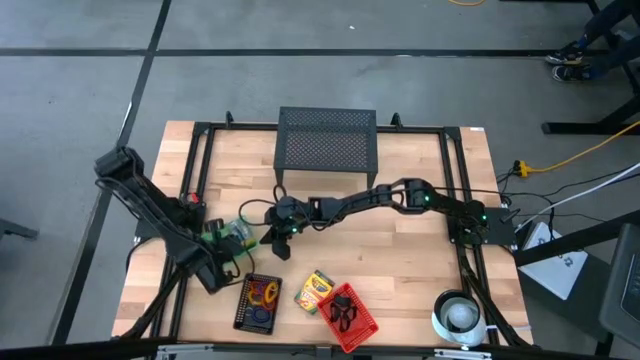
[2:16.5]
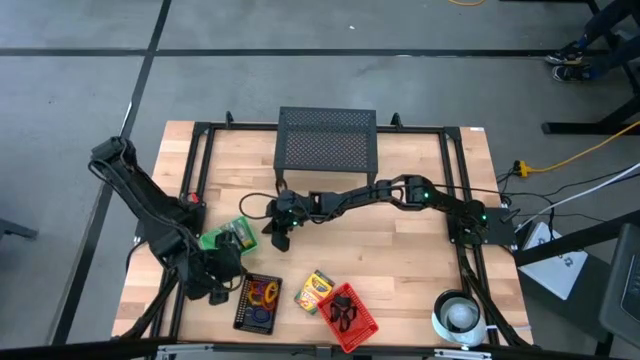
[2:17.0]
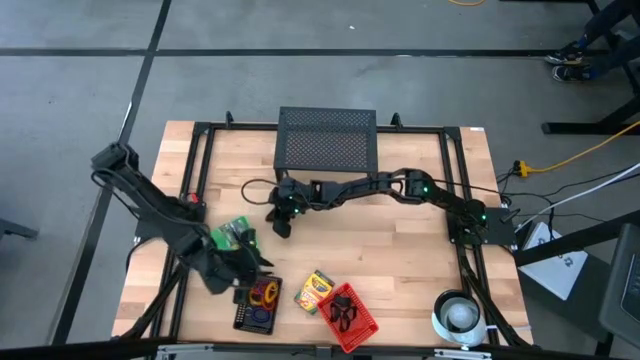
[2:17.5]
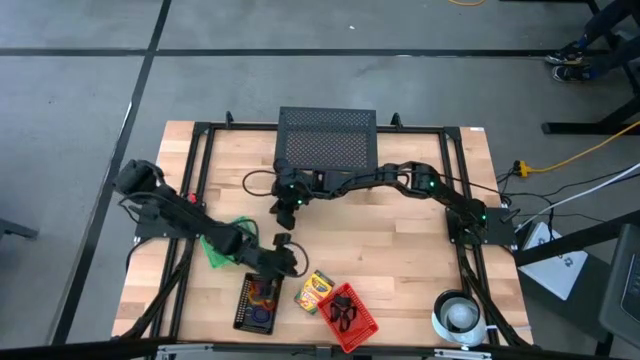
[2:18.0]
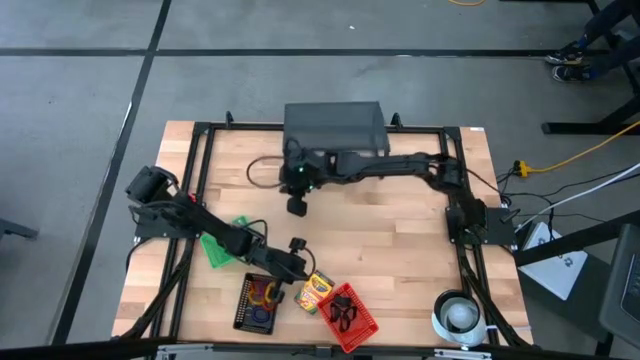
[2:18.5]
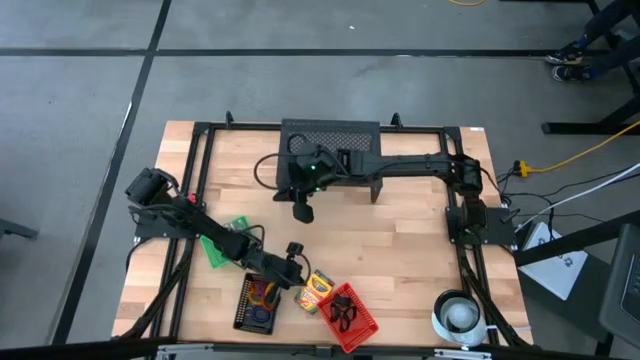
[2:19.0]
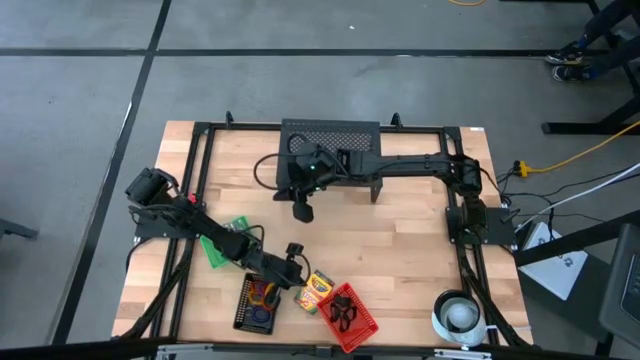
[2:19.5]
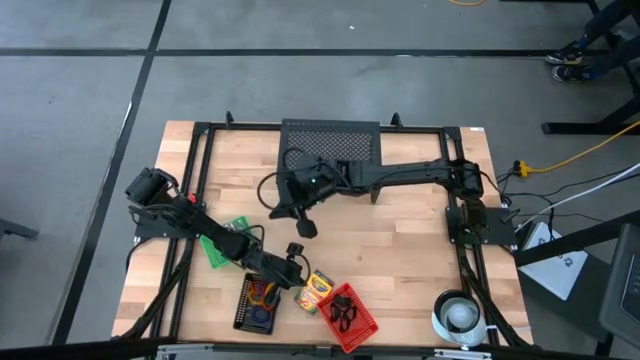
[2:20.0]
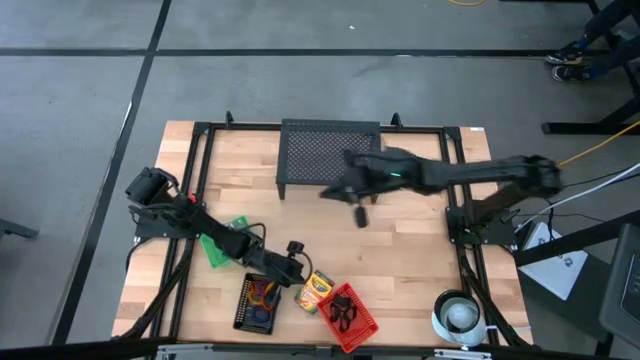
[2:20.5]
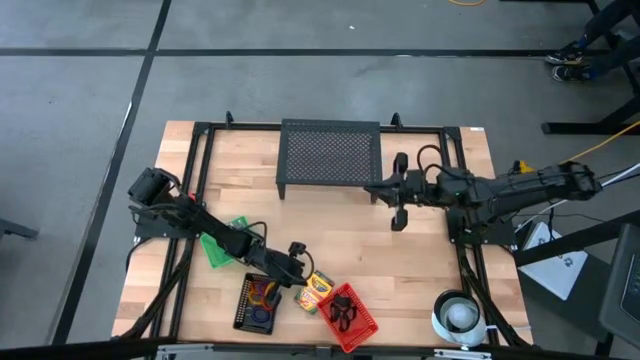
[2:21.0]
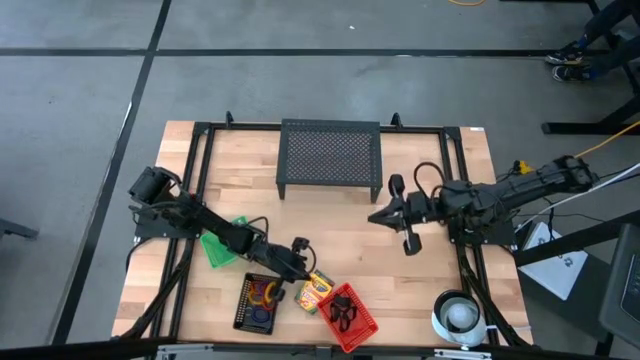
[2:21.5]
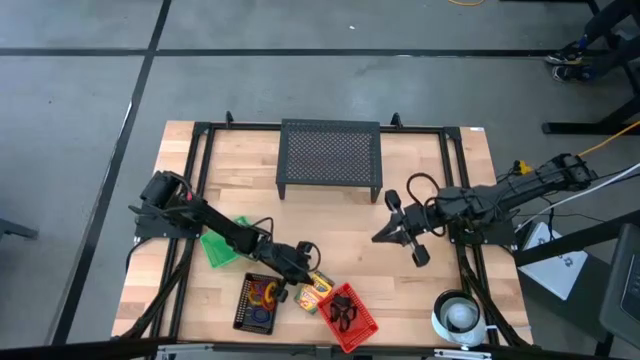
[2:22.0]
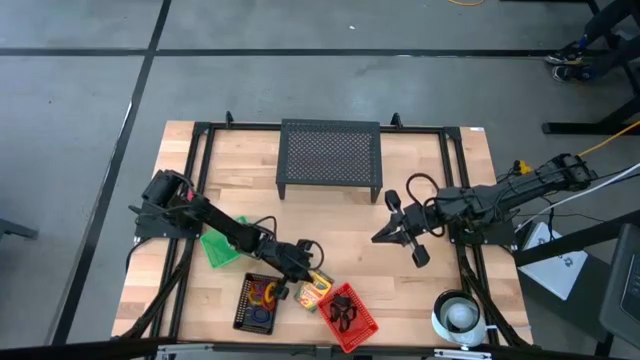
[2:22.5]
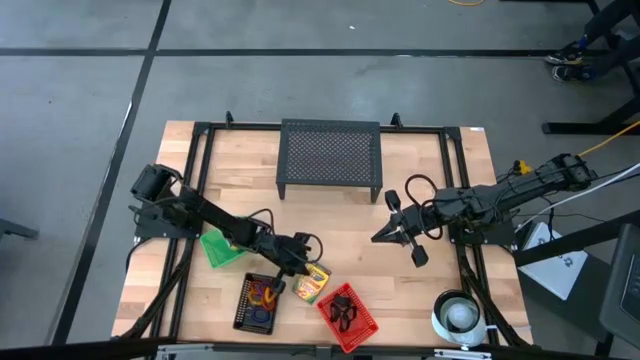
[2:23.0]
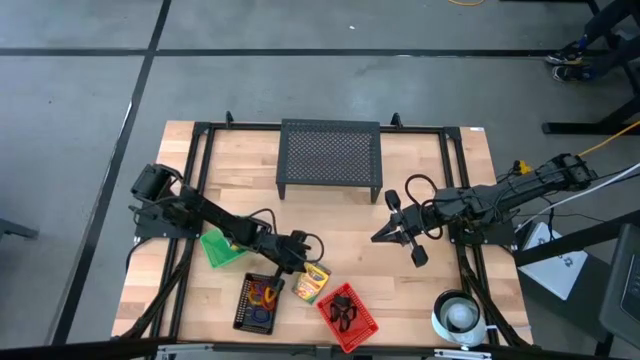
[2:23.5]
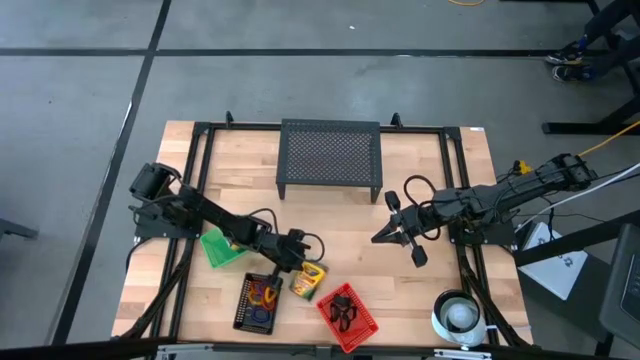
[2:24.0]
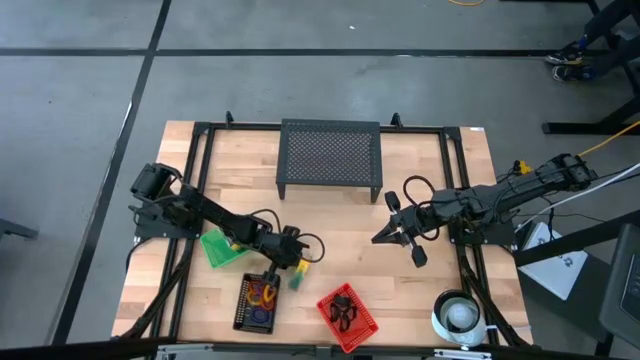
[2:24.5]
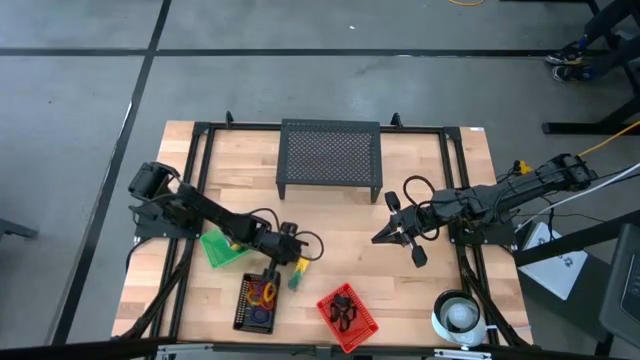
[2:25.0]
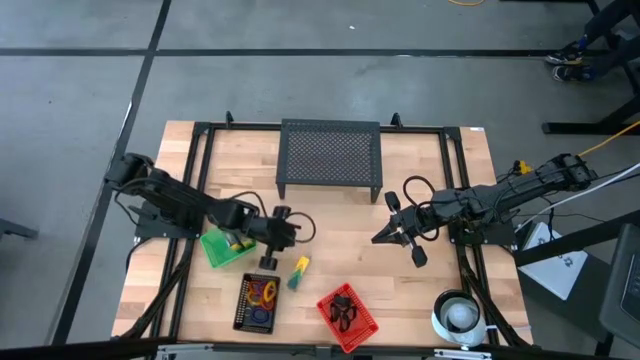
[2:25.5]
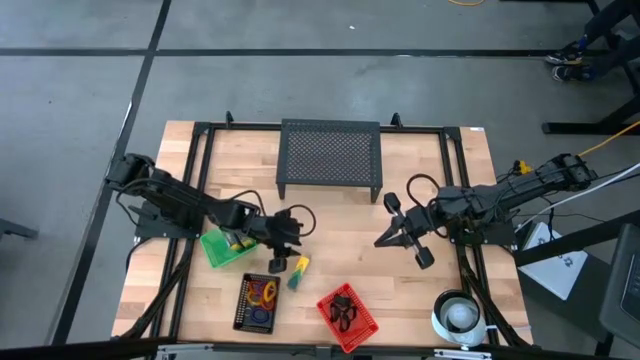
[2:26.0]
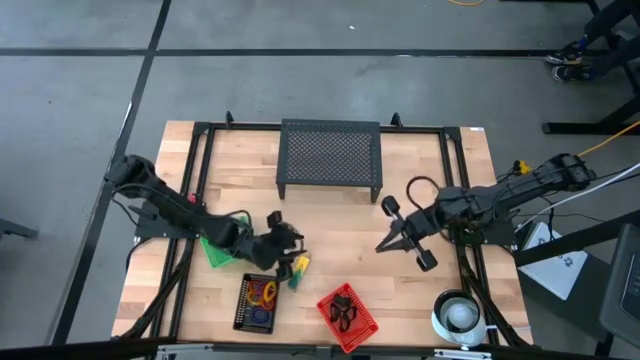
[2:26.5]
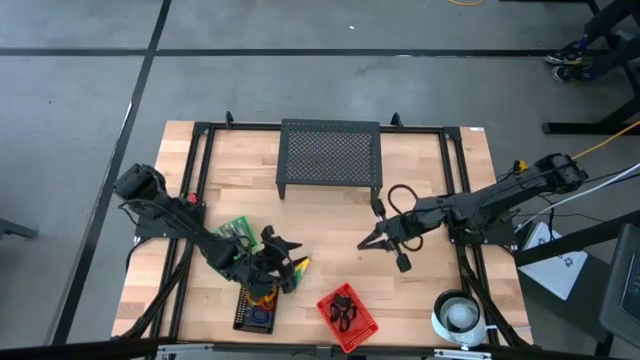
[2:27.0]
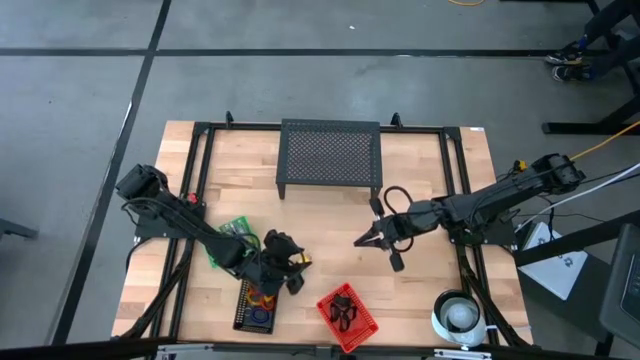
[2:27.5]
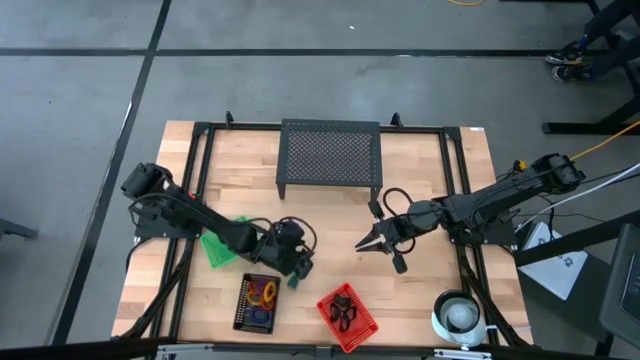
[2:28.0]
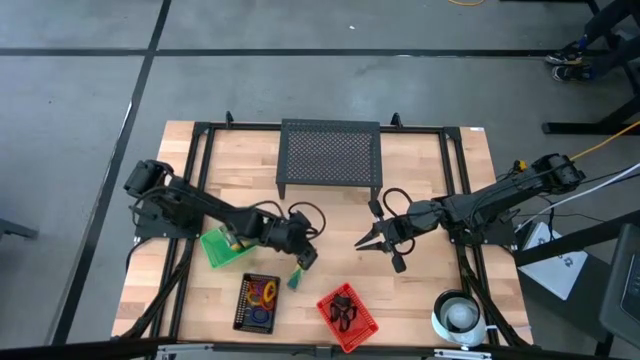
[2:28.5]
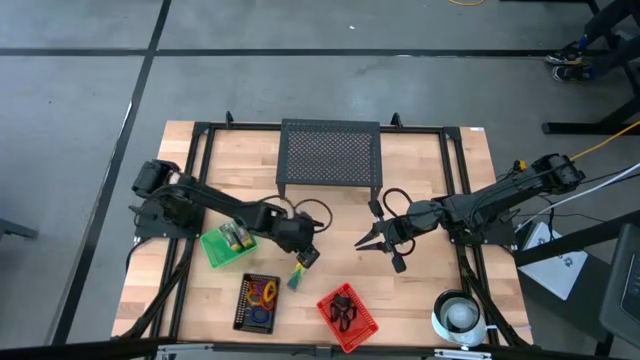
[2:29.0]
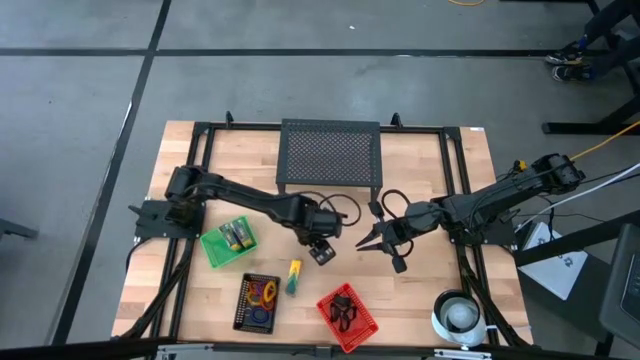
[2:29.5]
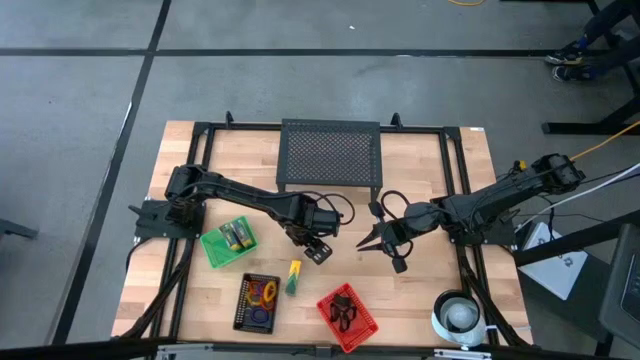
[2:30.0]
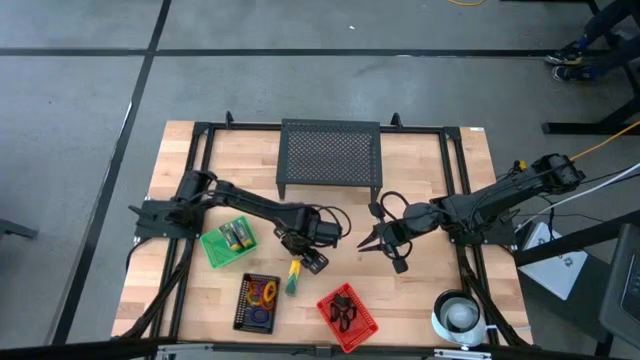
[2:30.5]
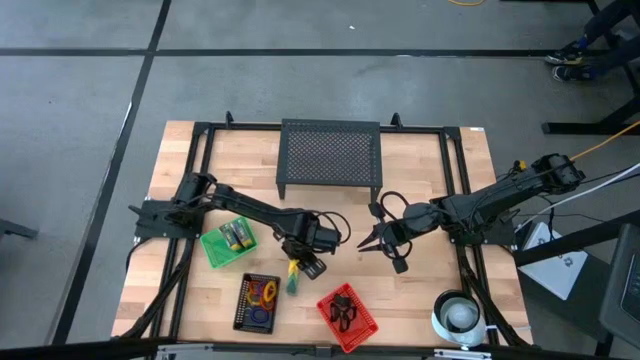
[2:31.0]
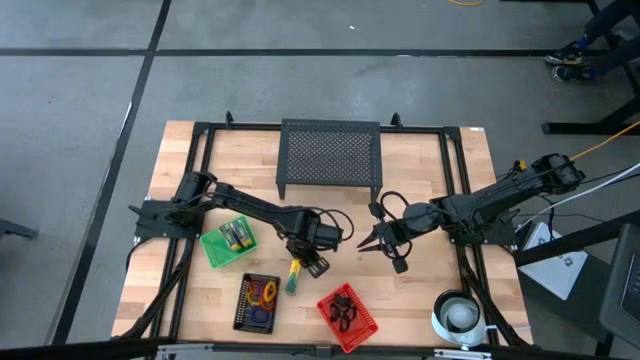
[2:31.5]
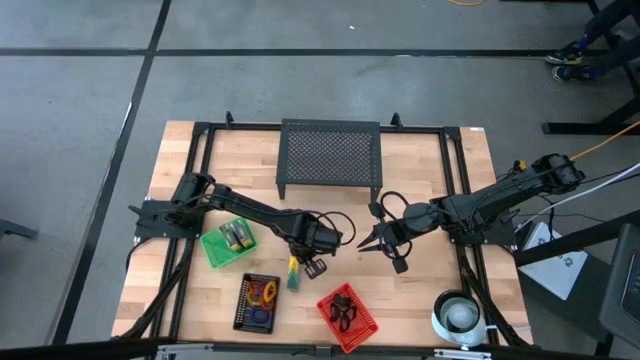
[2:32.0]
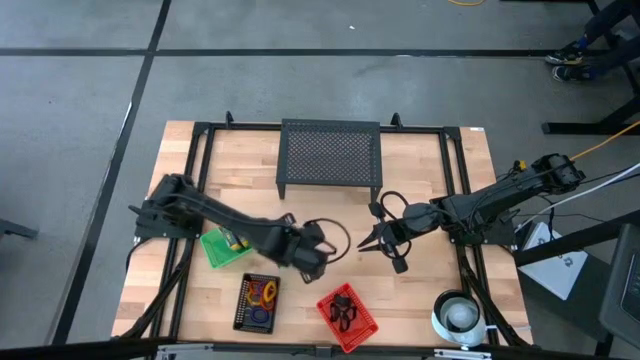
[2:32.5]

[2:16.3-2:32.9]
Task: Pick & Place Office Desk Supplies
Put the yellow crayon box into the green bin

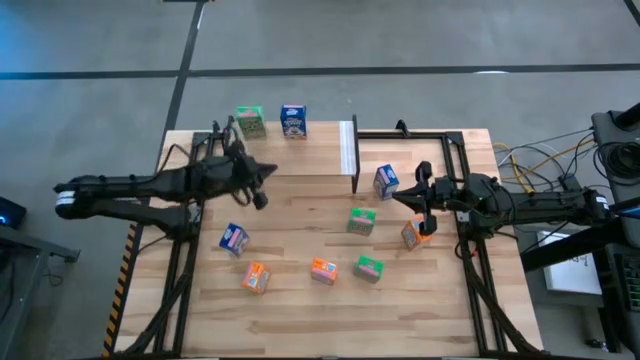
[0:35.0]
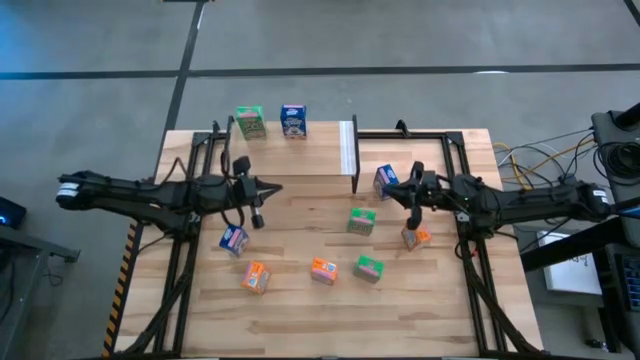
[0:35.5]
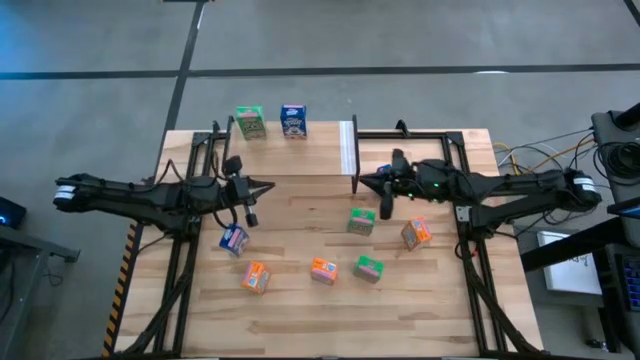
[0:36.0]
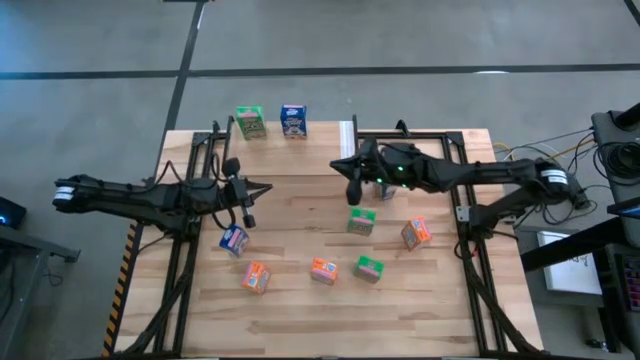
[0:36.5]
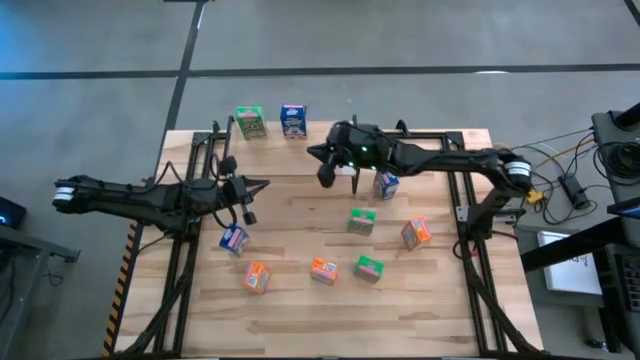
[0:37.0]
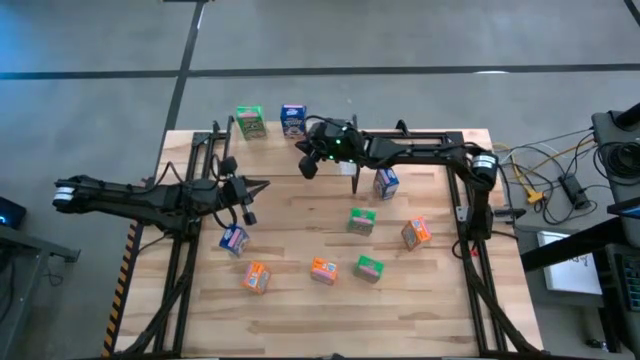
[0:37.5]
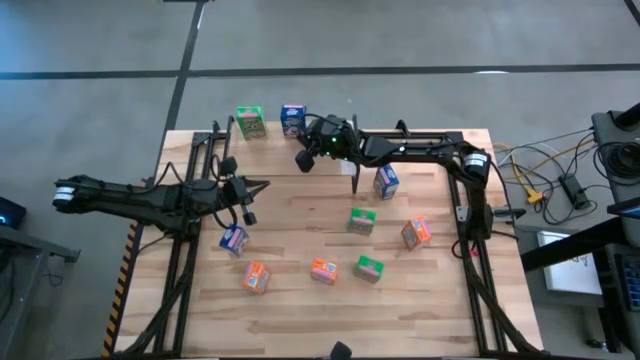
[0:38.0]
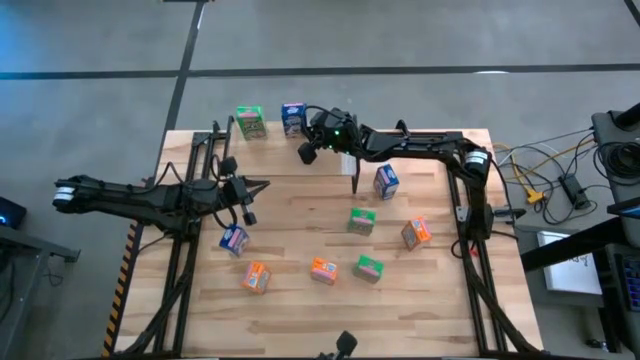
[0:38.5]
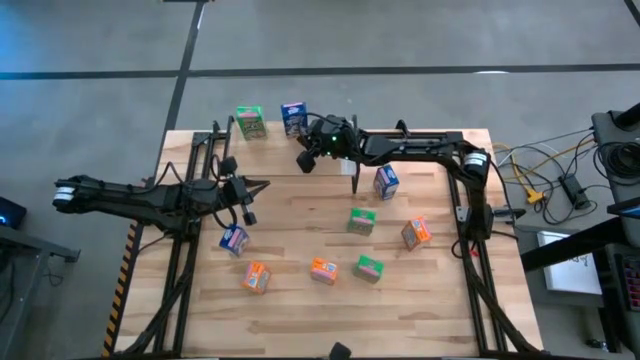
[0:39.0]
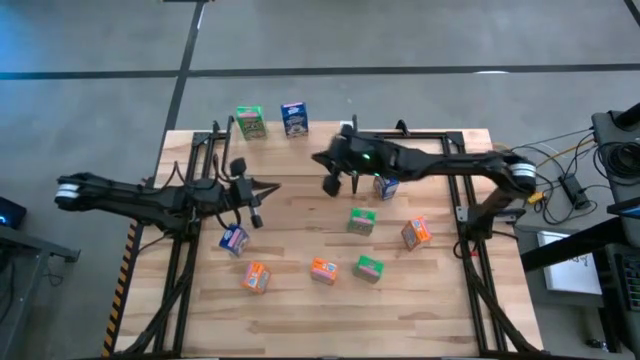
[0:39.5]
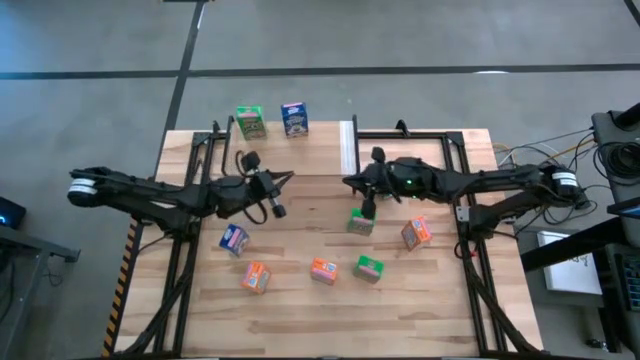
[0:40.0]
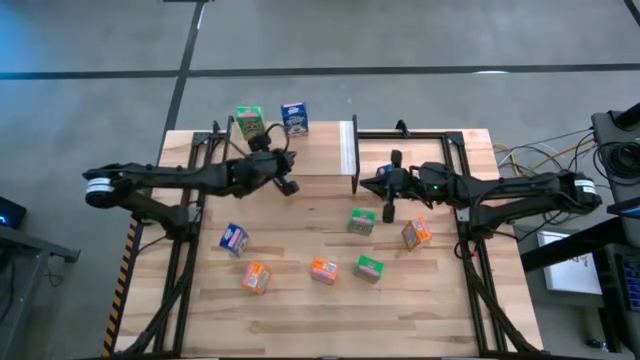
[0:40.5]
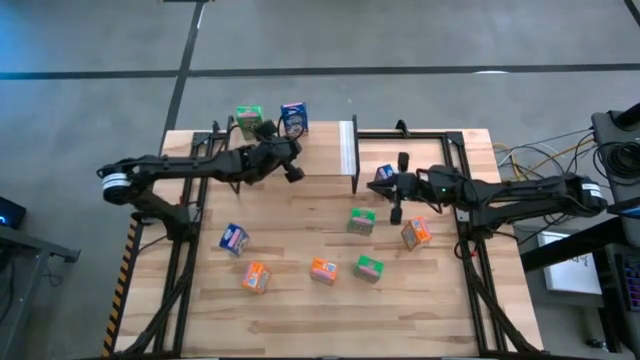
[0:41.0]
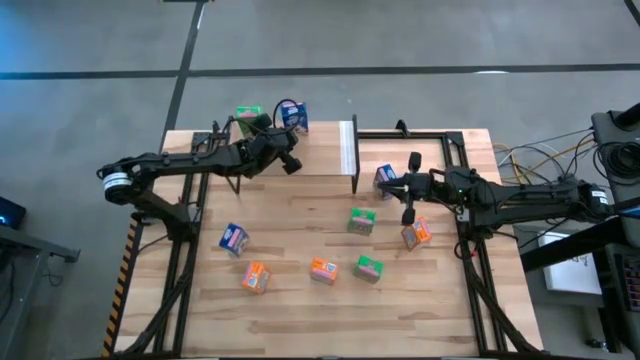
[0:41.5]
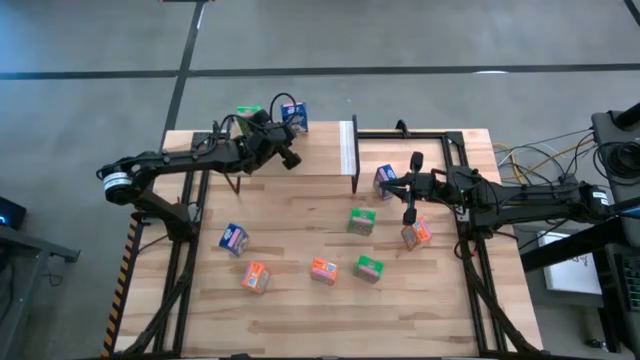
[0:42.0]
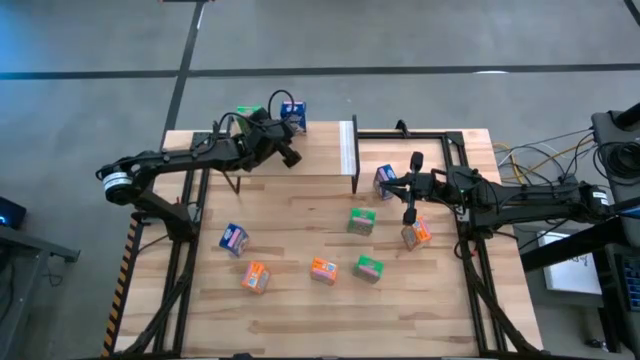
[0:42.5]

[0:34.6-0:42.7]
Task: Stack cereal on shelf
Adjust the blue cereal box on the shelf
